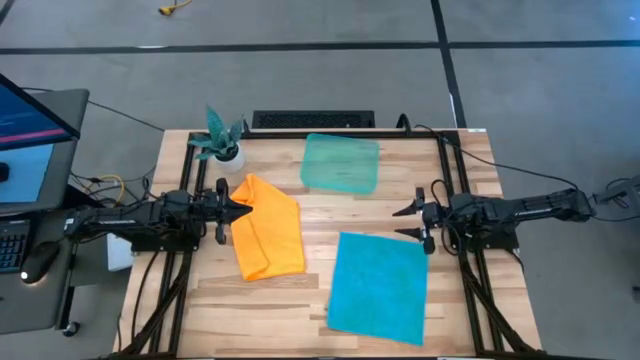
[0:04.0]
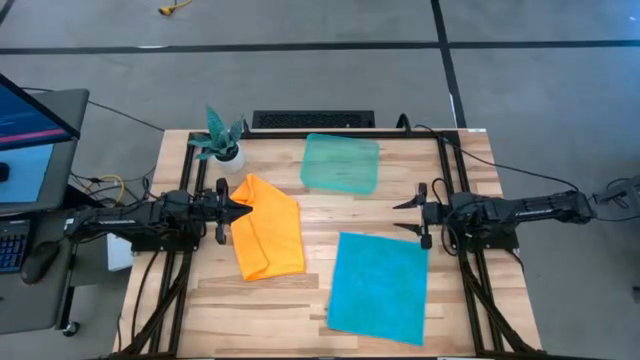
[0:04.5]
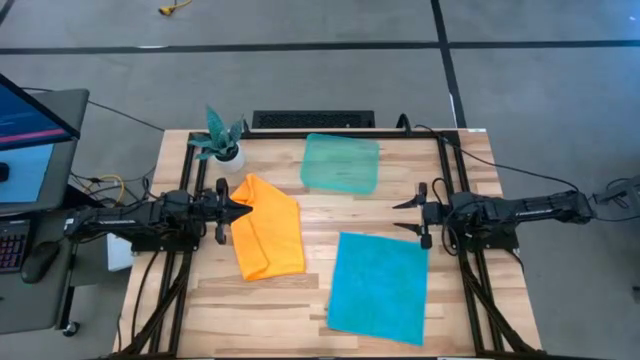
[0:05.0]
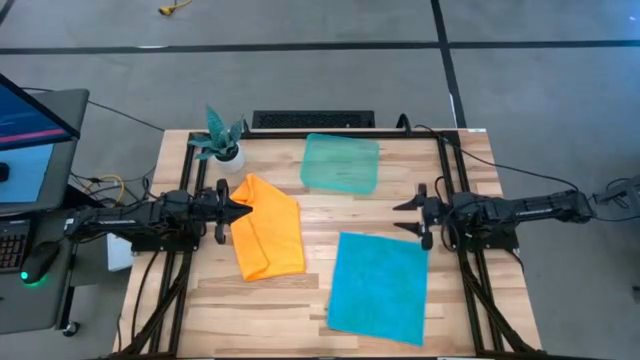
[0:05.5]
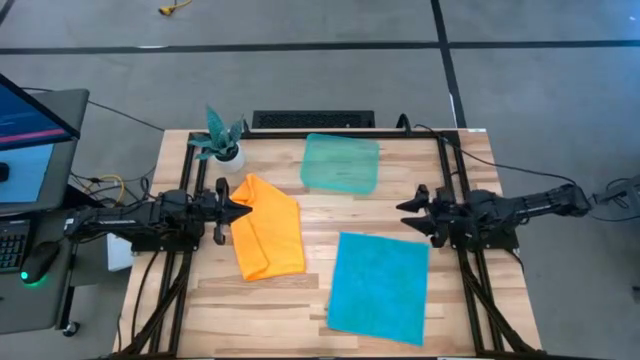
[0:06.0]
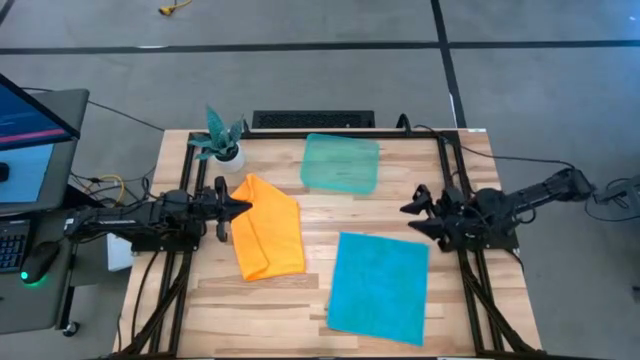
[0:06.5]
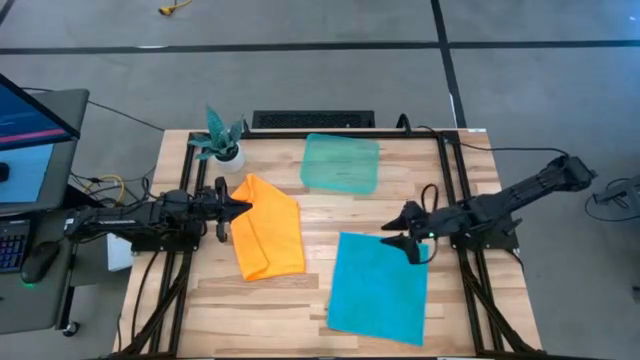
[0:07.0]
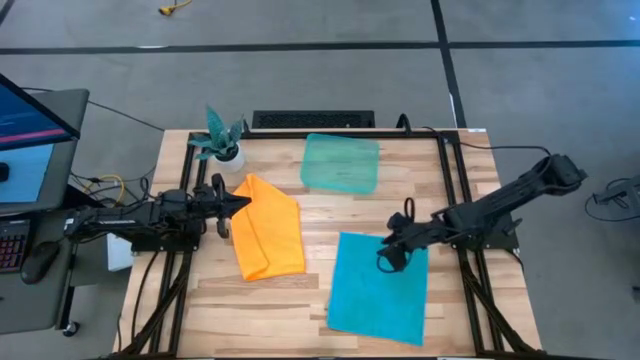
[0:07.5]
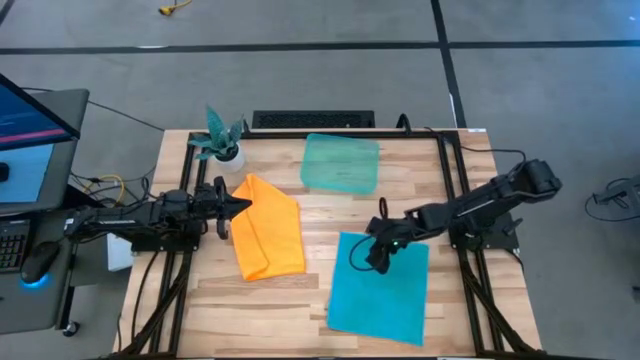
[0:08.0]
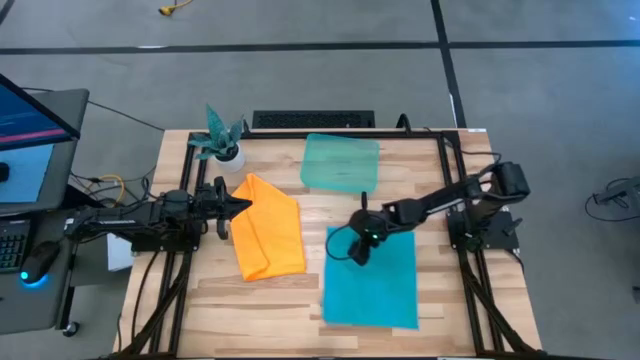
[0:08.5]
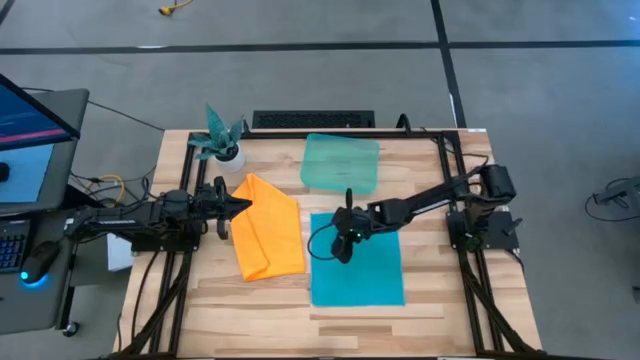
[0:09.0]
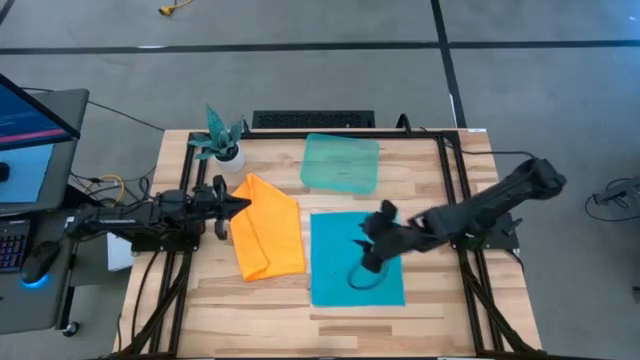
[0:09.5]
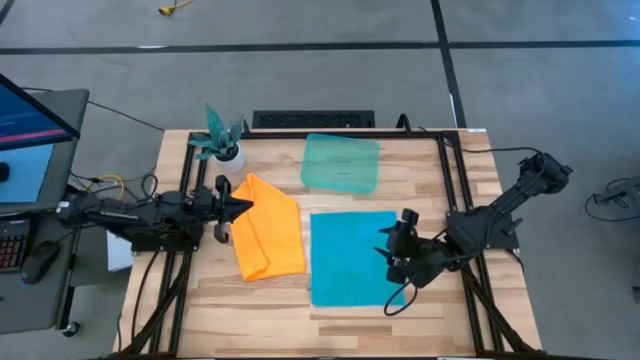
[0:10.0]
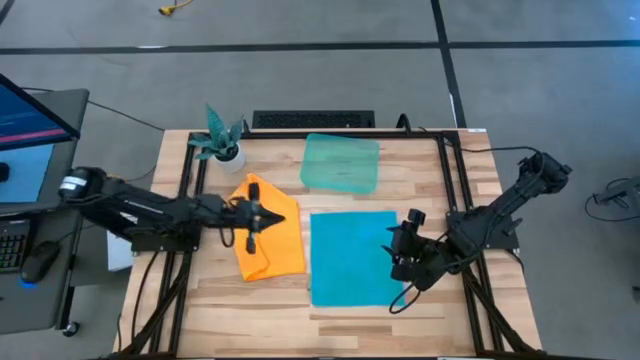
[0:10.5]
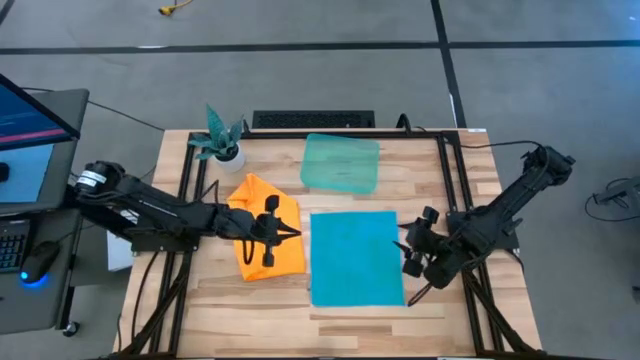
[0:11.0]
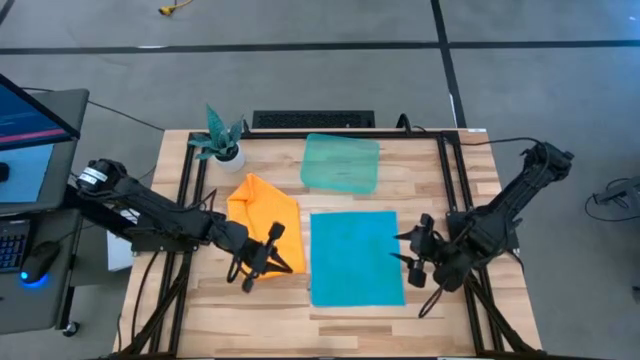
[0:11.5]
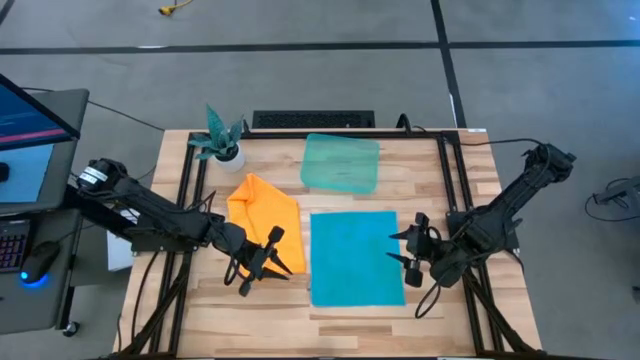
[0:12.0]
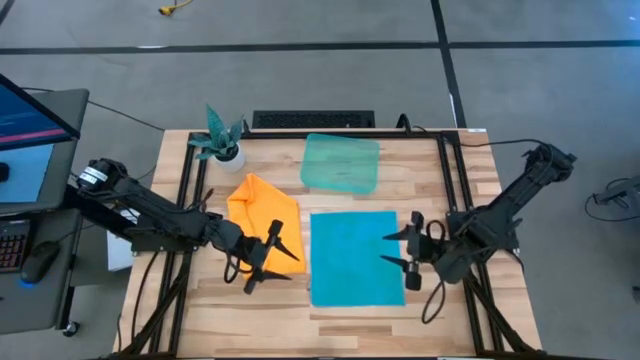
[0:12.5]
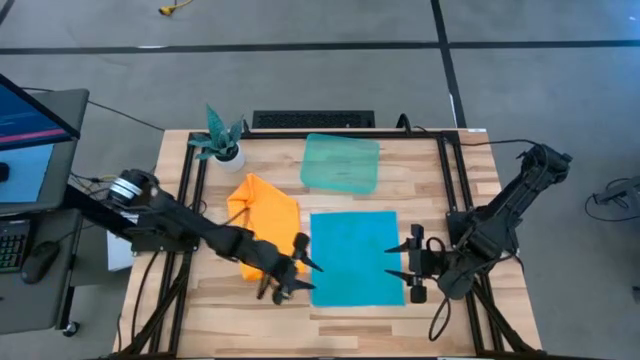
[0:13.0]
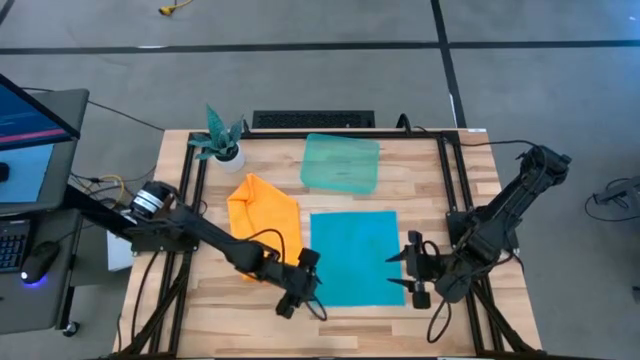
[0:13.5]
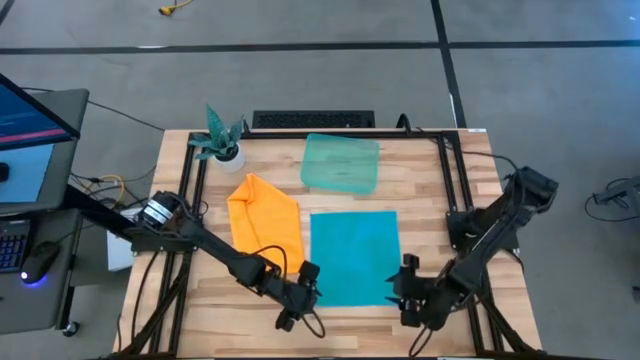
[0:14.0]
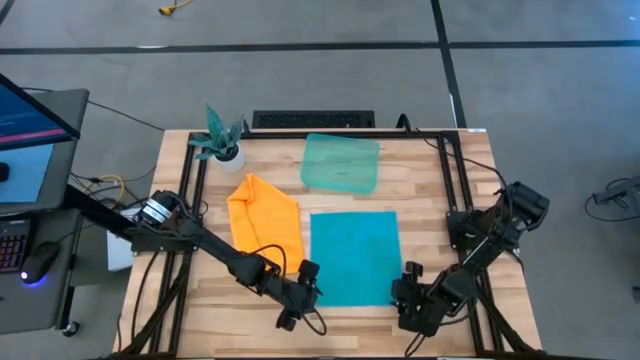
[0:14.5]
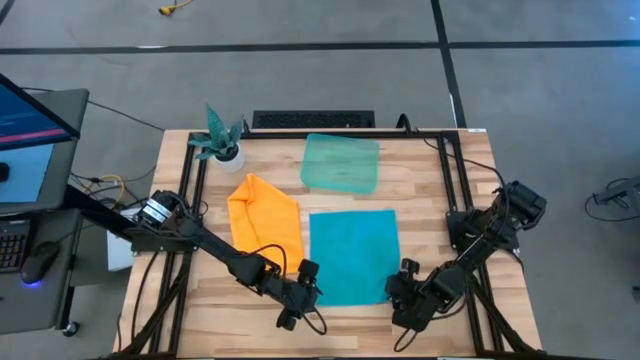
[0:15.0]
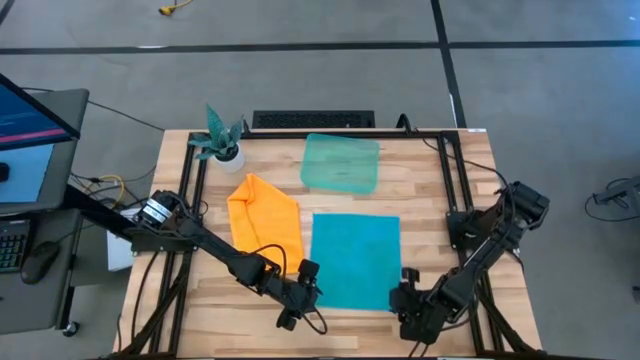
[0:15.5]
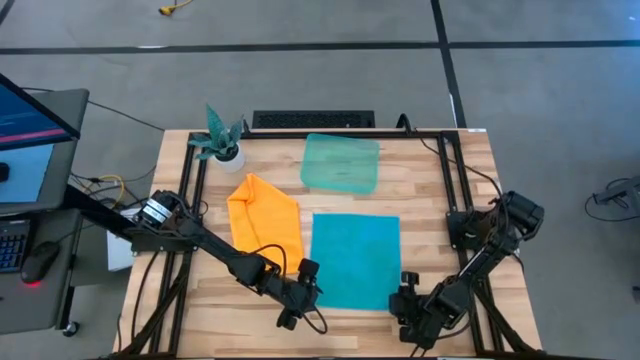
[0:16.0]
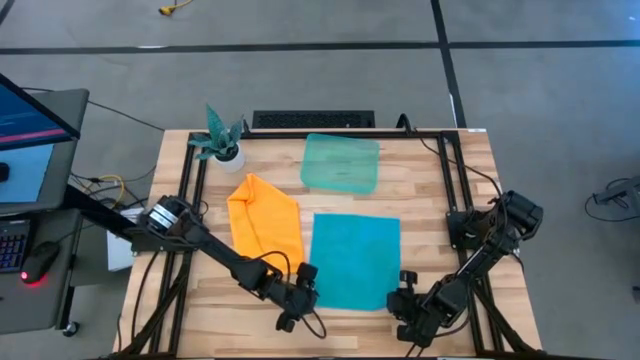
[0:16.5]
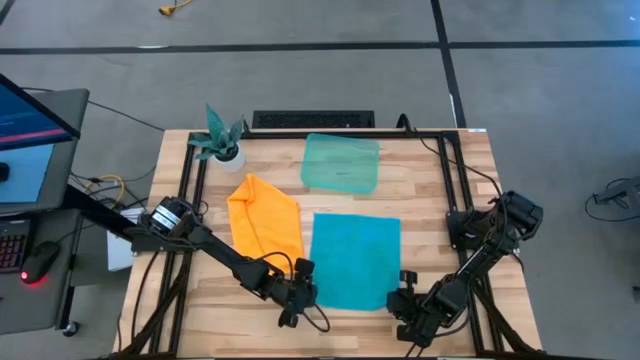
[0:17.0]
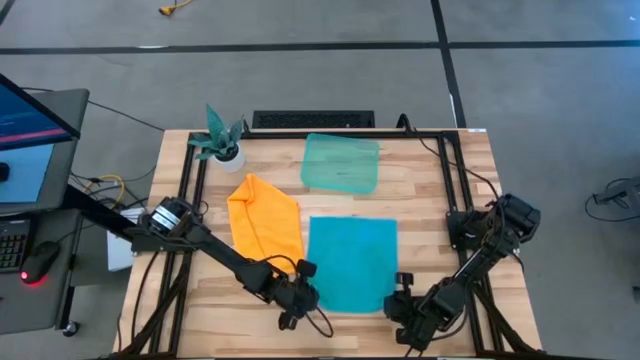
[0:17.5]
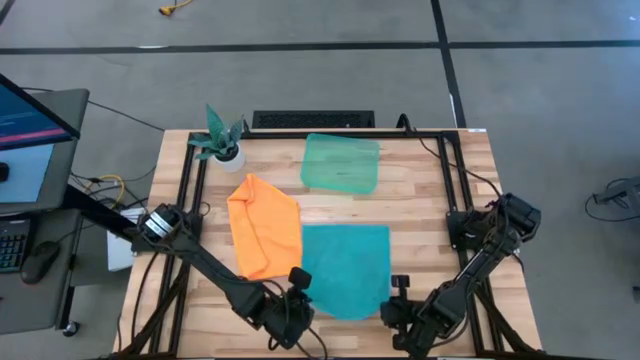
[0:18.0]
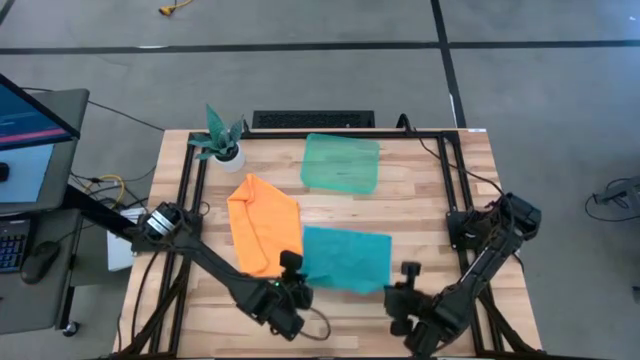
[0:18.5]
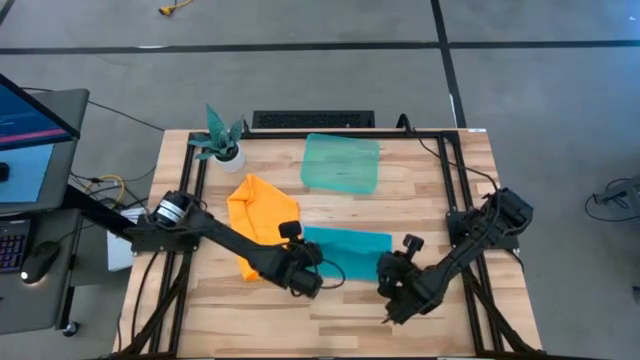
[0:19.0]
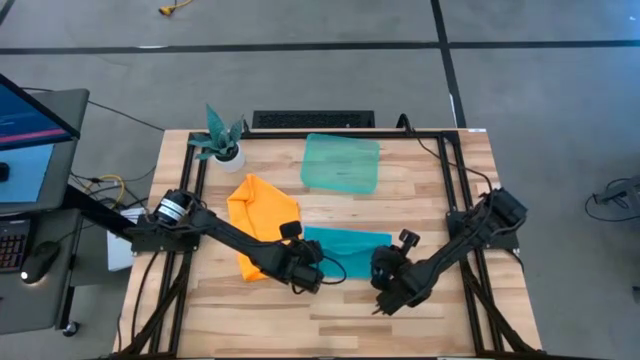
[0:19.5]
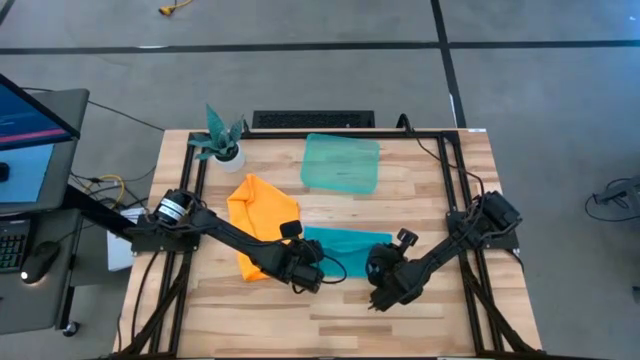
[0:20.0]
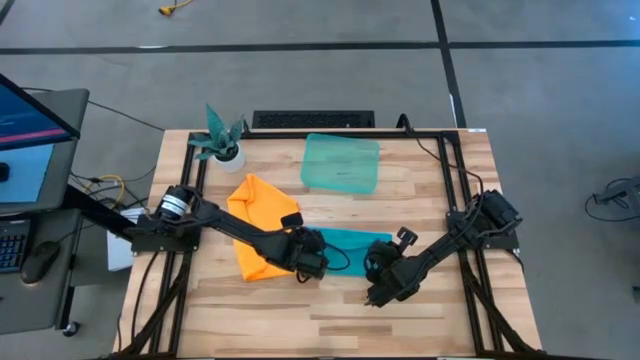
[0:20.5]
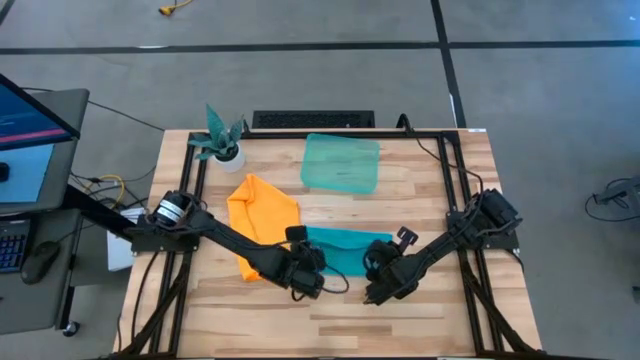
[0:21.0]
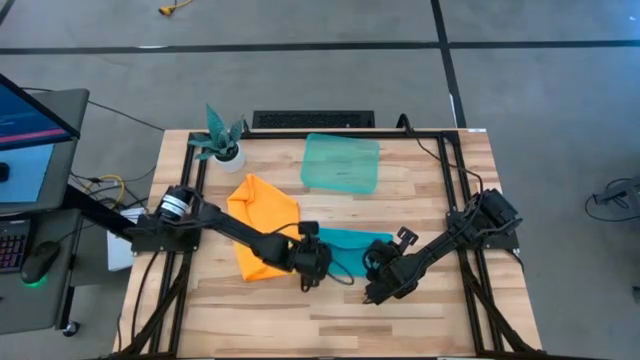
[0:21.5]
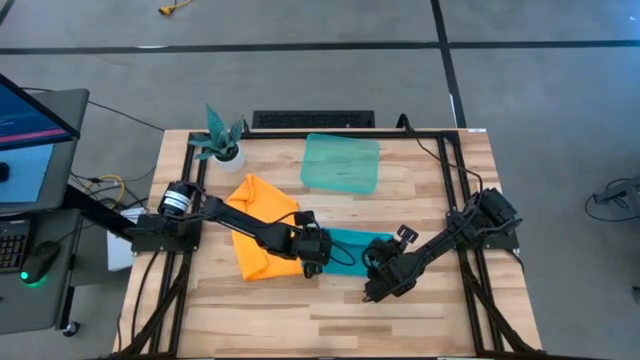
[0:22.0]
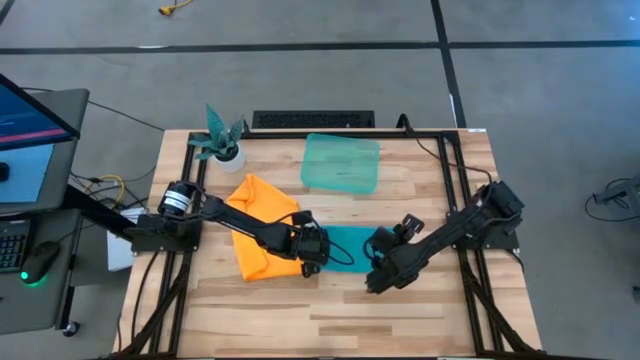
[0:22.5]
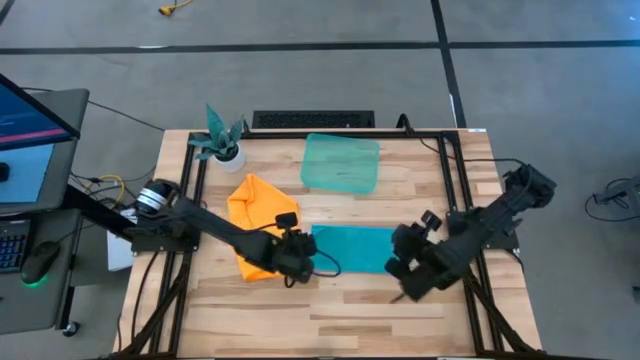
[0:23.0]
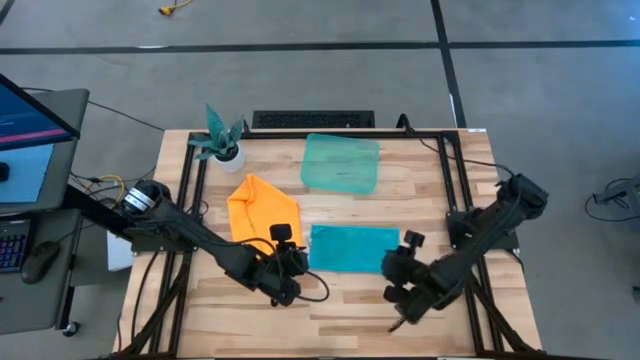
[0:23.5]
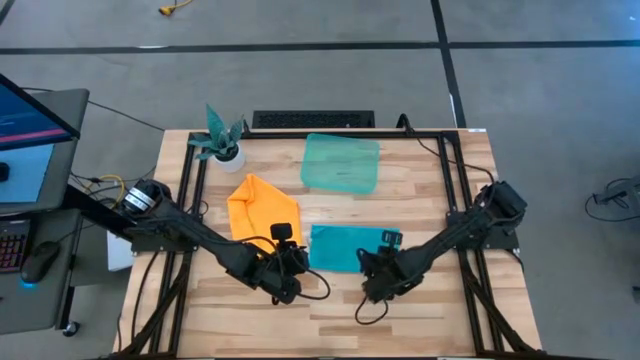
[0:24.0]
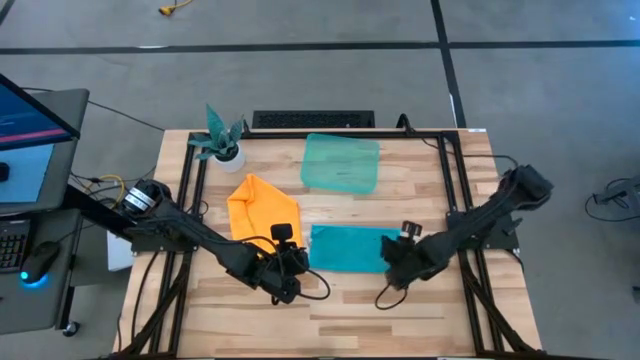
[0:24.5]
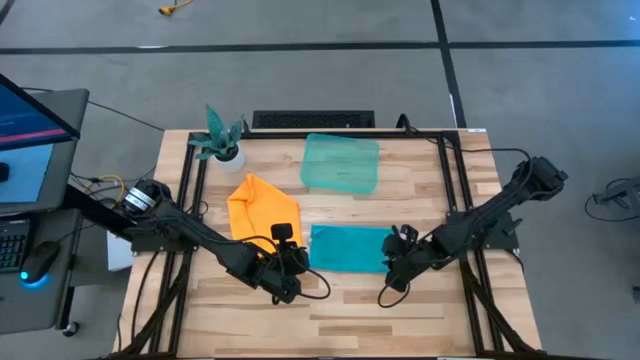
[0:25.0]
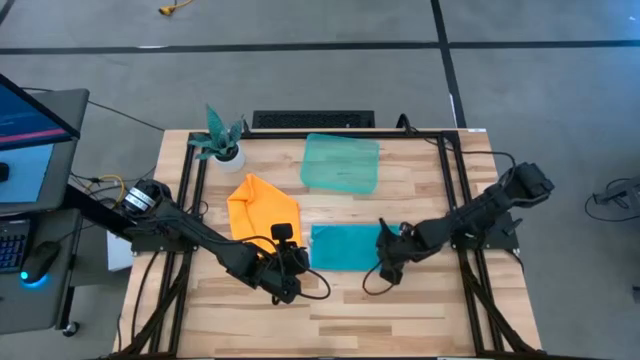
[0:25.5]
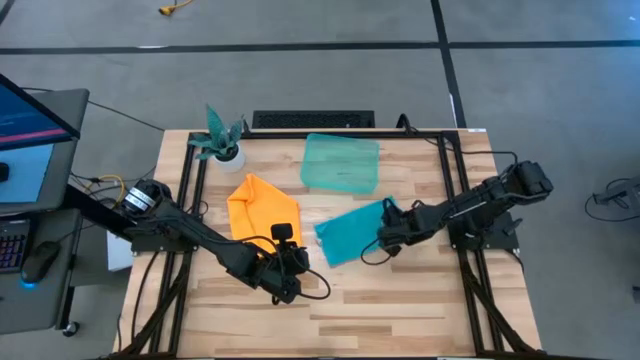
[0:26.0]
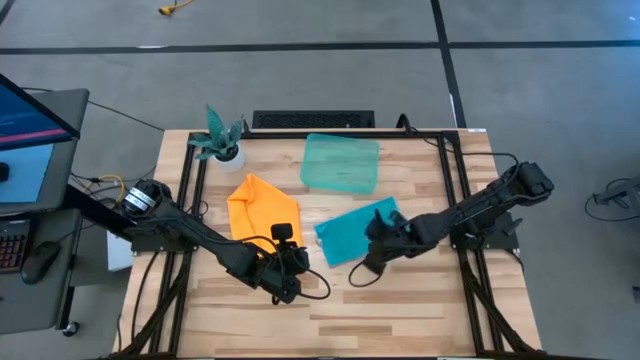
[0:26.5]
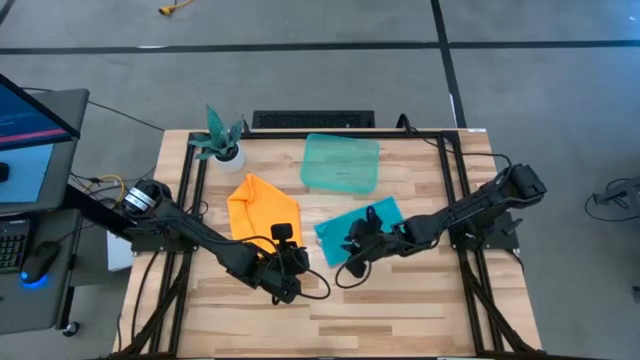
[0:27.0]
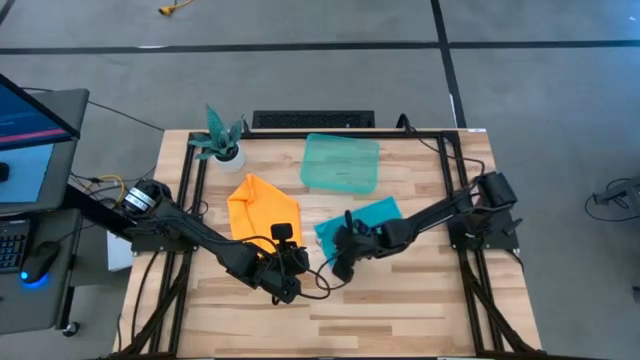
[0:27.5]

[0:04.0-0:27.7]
Task: Roll microfiber towels into tight, uniform cylinder then place into a basket
Fold the blue microfiber towel
